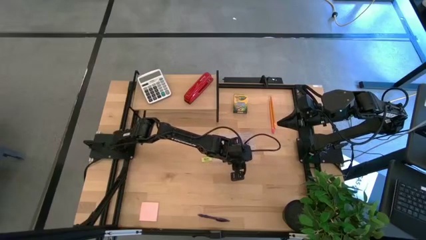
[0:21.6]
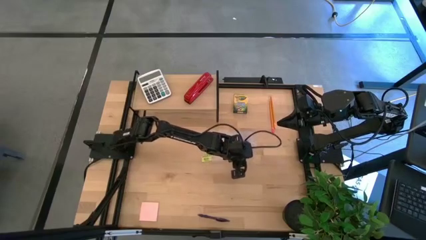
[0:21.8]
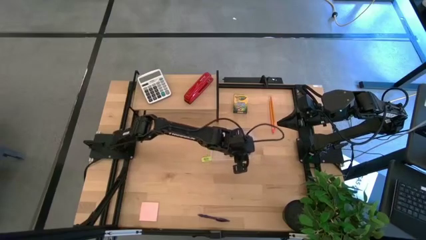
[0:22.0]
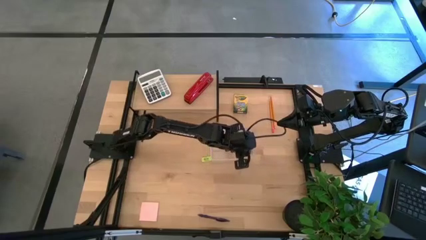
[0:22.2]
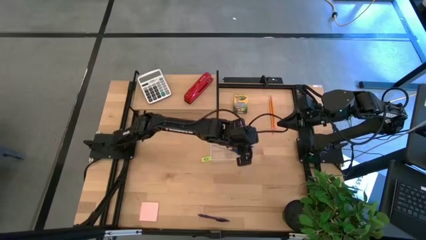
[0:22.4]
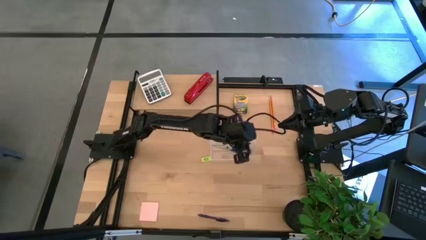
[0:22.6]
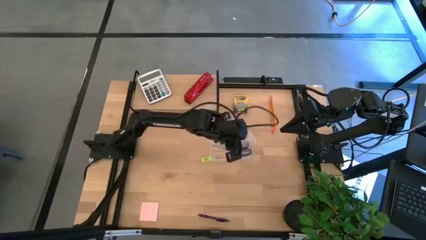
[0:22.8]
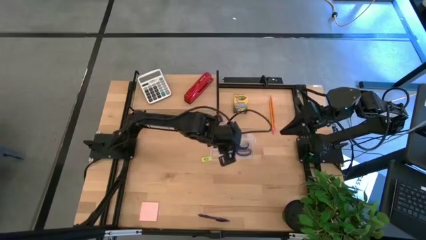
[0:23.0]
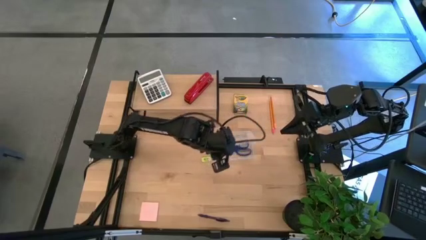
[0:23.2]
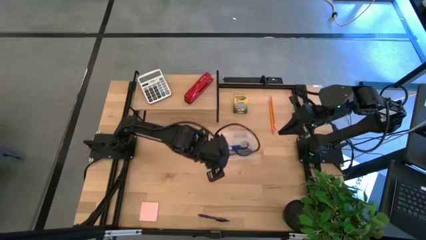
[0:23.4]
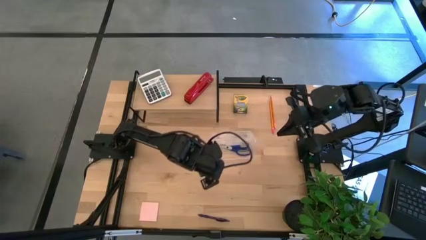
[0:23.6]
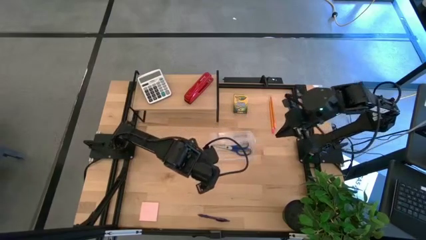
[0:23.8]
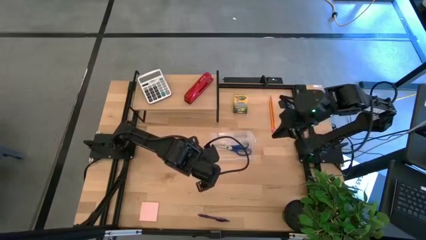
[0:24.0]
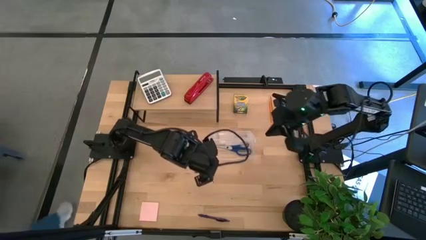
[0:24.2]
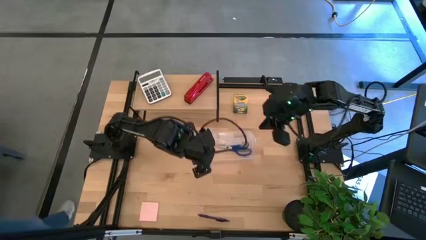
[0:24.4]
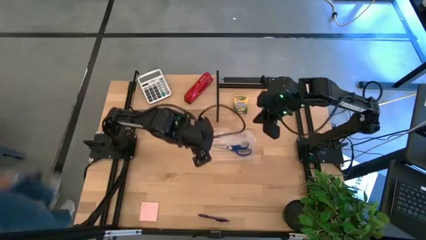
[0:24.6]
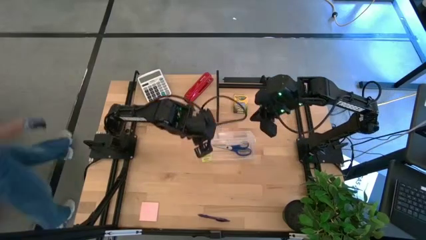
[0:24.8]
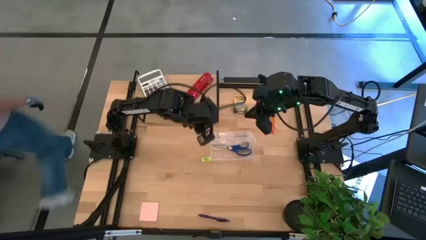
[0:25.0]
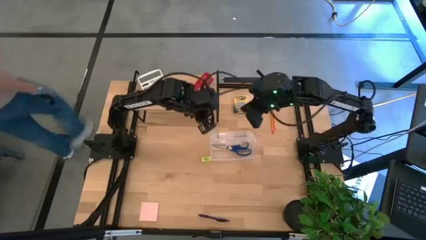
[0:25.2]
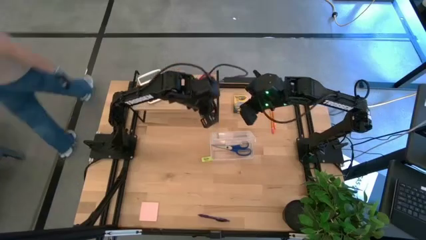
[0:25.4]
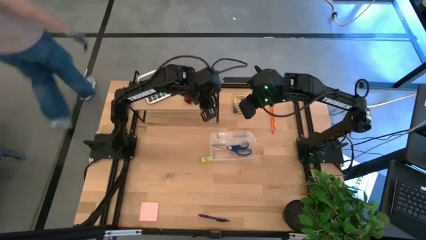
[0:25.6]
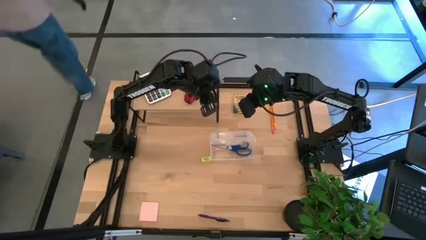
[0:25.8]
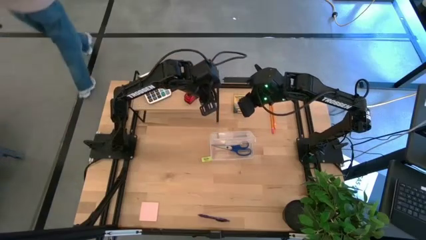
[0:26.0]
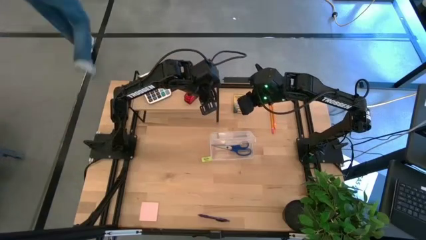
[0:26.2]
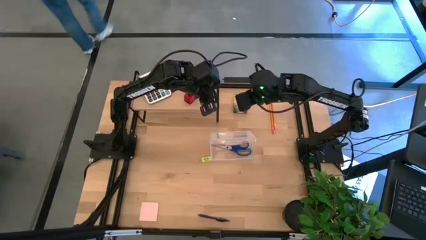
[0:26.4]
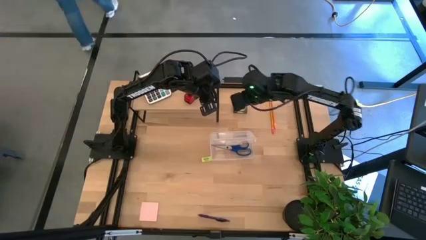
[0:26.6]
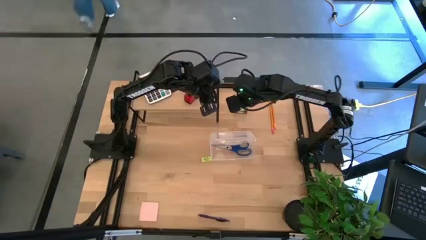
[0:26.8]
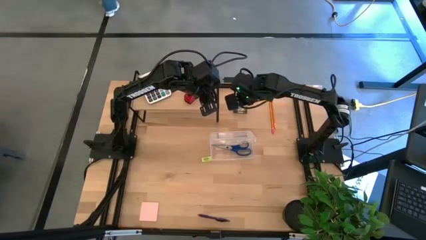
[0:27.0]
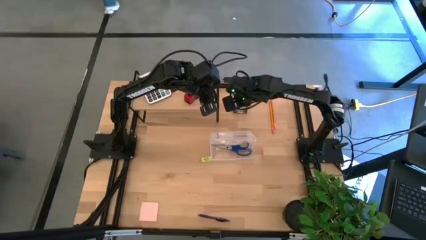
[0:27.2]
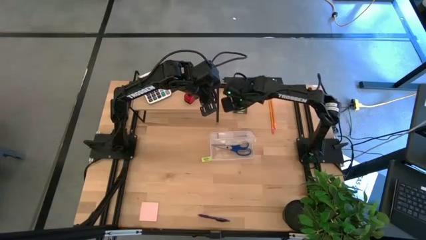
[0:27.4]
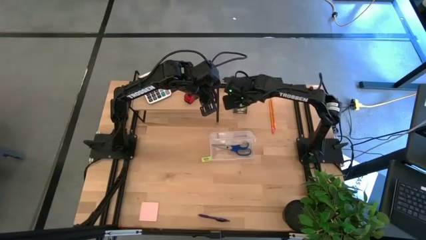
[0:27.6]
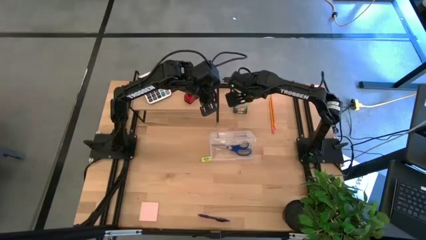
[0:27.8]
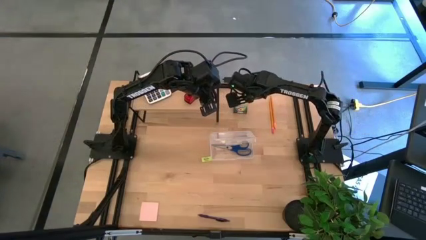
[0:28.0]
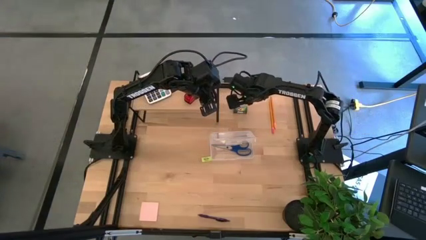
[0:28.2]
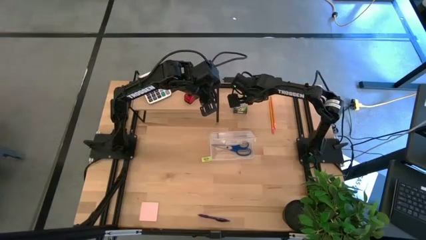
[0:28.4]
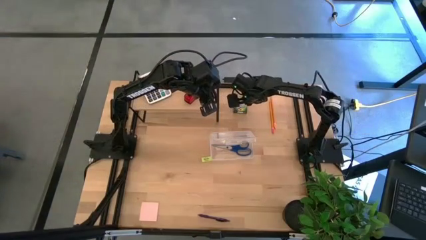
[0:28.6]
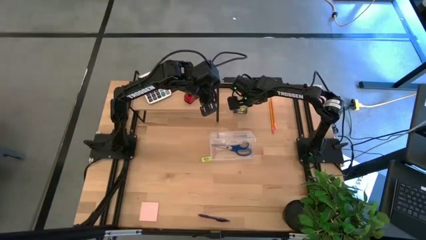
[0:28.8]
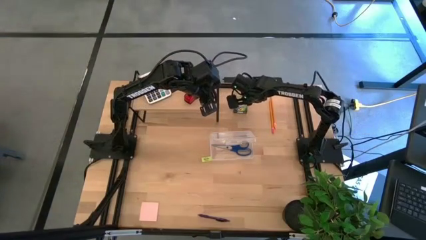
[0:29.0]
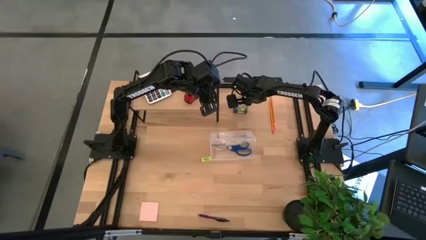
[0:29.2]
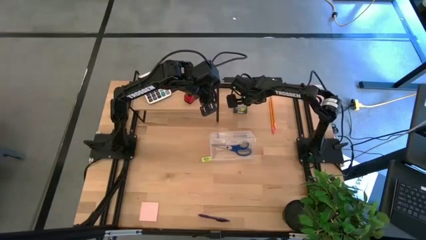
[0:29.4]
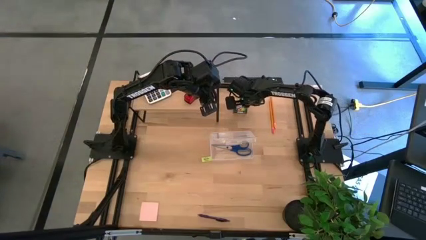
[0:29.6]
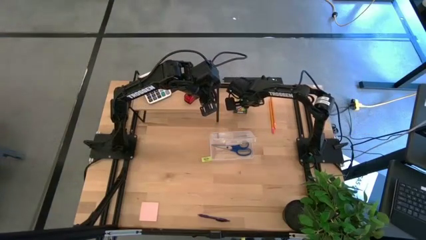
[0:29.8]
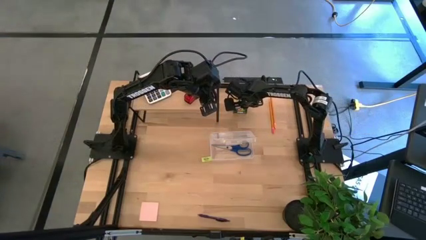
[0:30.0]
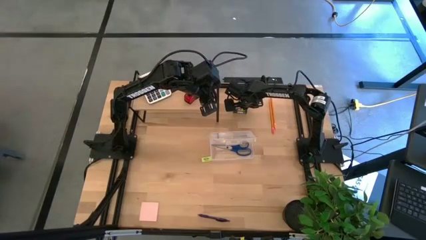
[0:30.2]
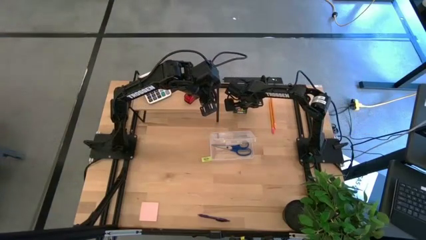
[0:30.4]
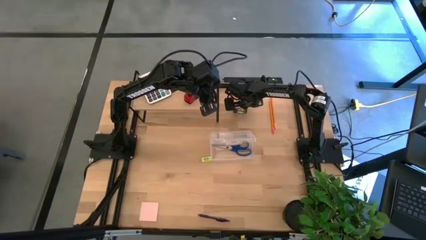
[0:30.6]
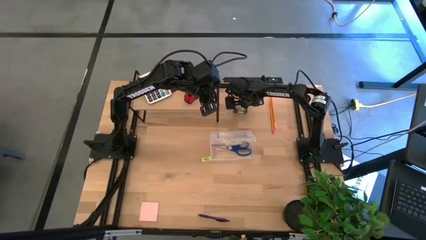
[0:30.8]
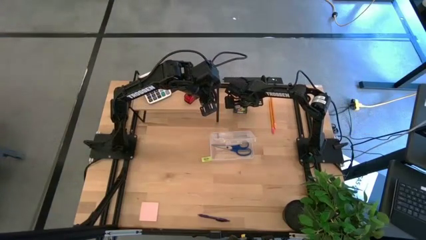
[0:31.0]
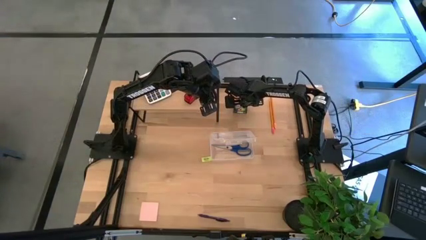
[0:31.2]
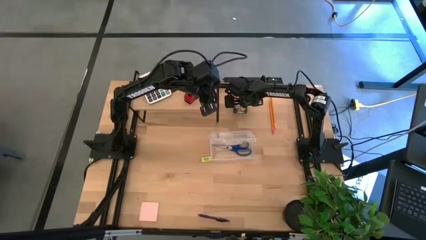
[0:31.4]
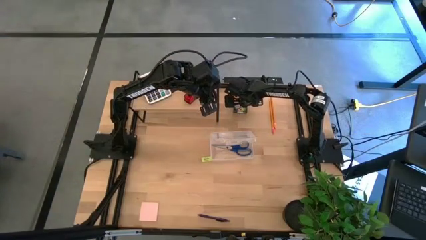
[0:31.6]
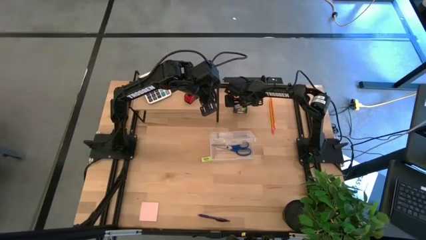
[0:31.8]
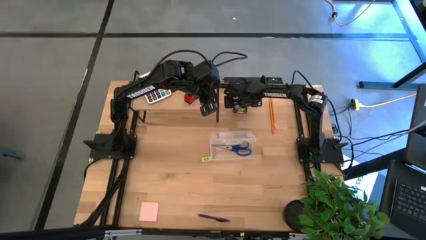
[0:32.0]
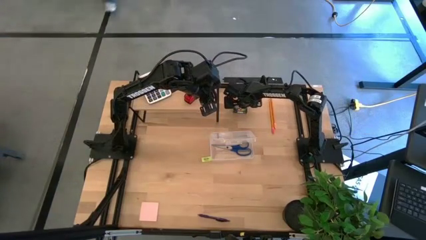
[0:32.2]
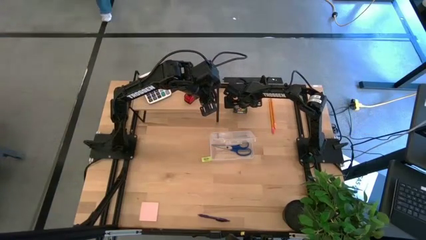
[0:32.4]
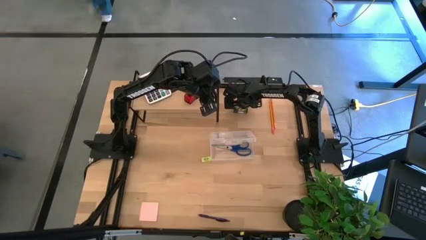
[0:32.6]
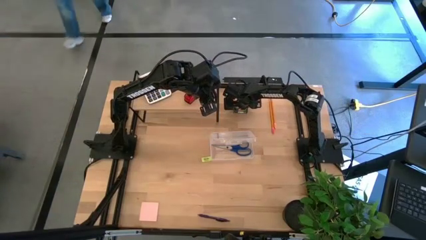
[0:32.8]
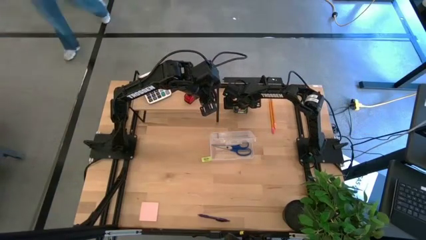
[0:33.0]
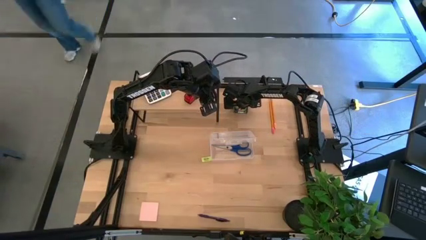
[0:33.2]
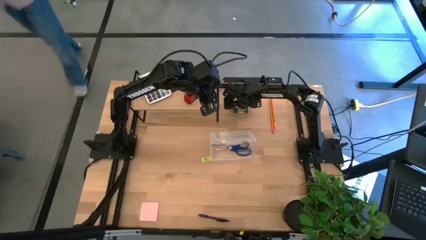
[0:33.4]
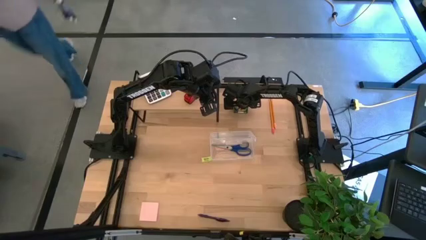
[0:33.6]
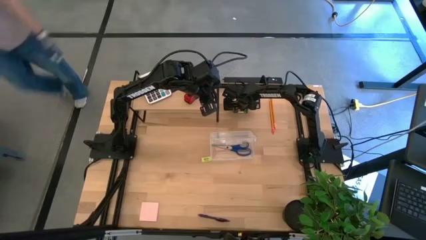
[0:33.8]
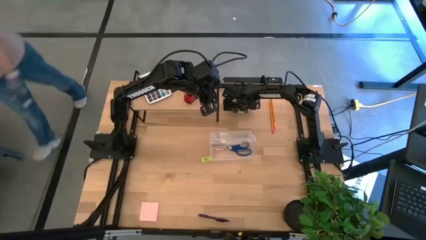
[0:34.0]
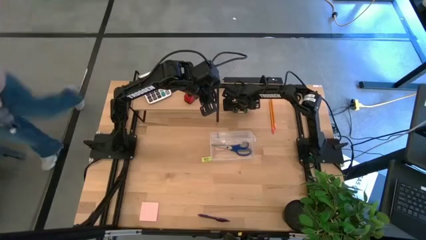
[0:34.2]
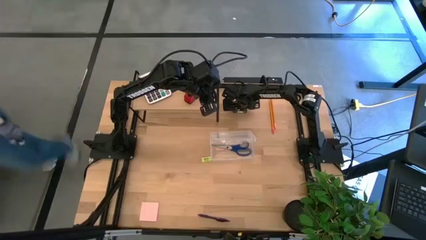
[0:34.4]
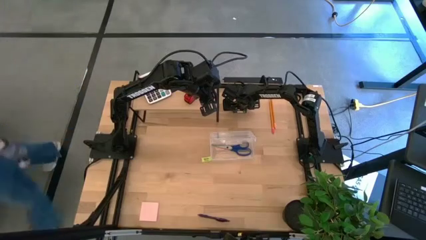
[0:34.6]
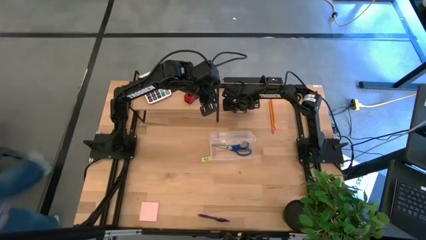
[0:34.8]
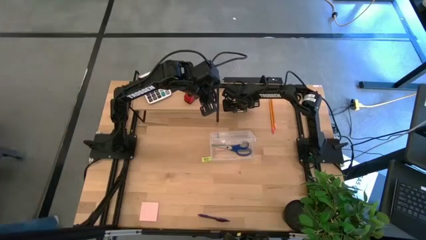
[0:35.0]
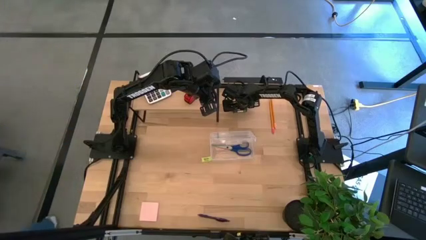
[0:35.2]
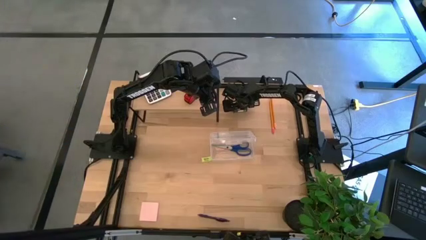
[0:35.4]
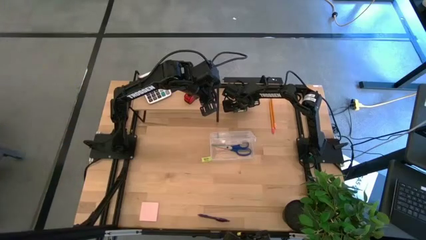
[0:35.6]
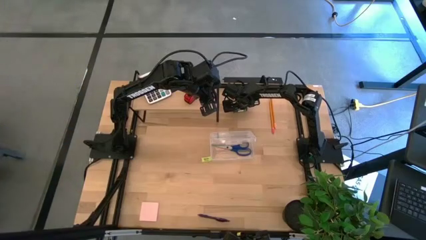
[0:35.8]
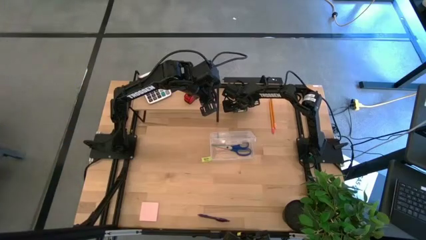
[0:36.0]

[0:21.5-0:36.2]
Task: Pack school essentials
Put the yellow crayon box into the supply box
